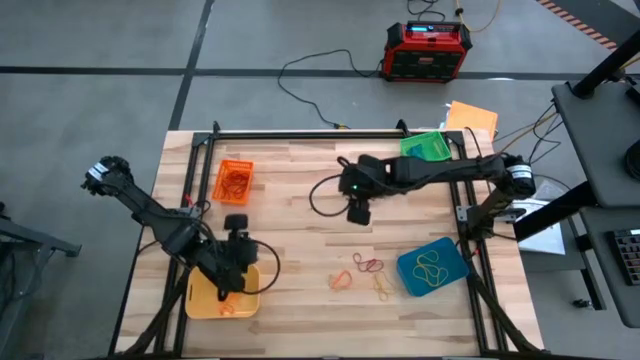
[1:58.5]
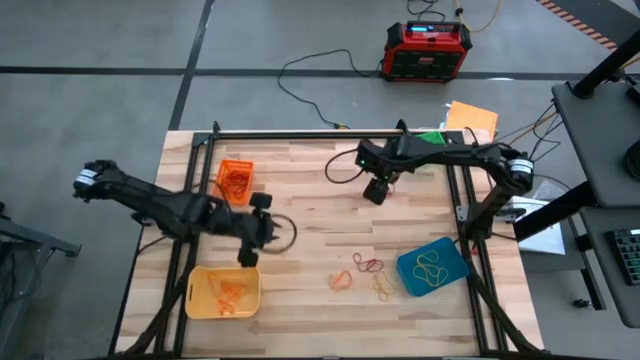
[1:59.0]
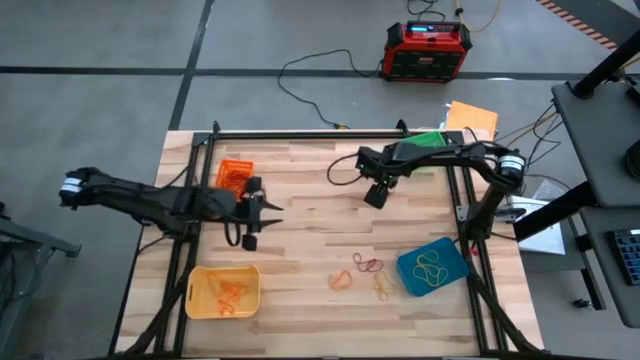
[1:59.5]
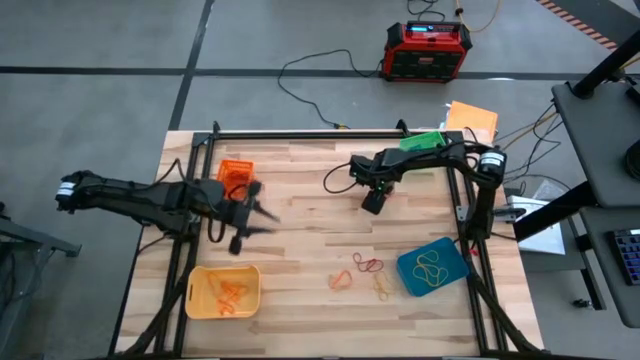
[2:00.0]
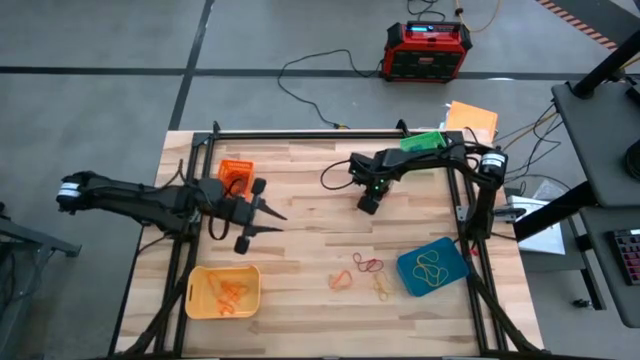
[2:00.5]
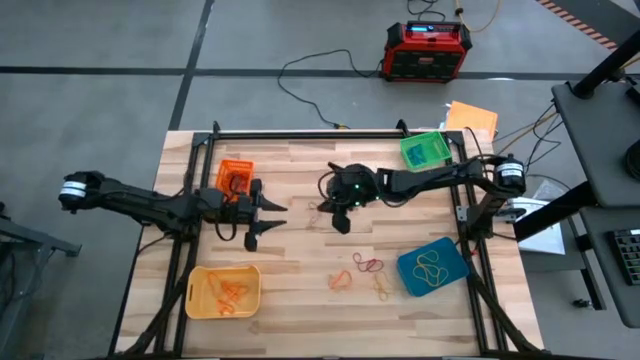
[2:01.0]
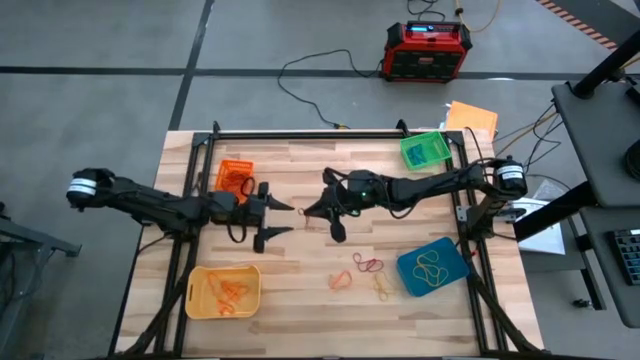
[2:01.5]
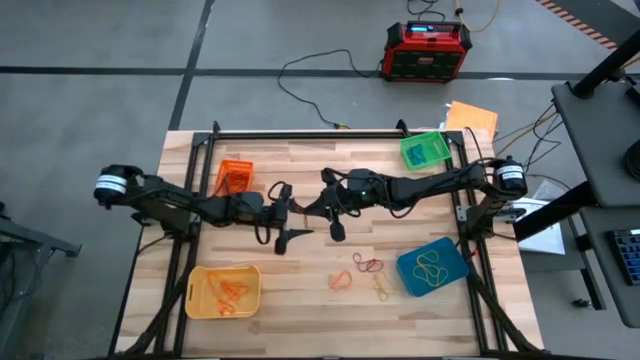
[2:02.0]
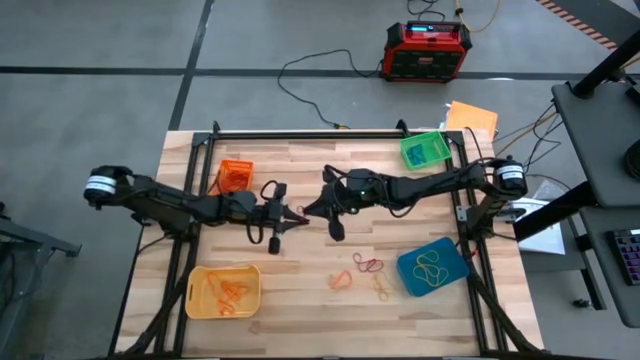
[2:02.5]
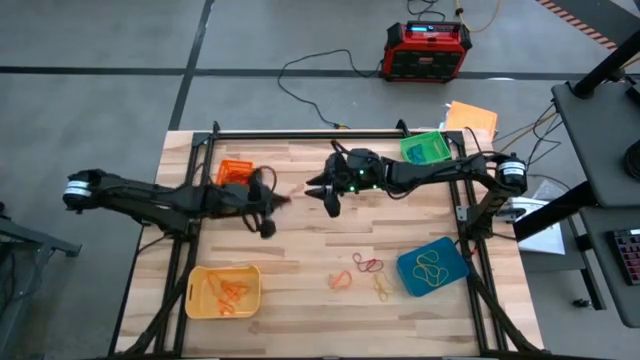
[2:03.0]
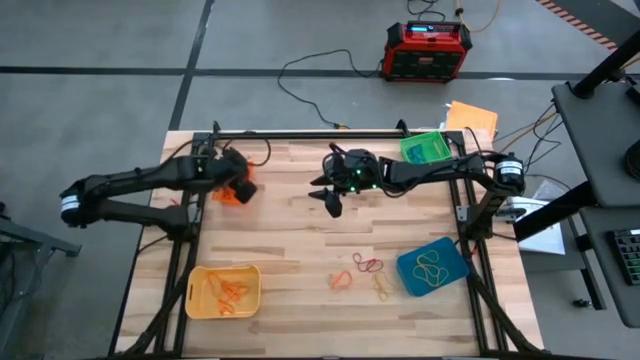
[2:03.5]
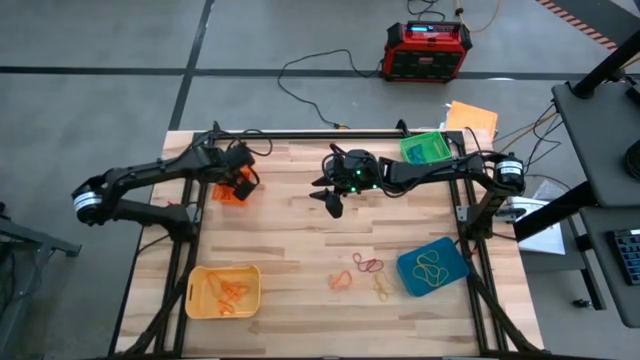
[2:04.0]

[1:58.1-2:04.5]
Task: Sort rubber bands into baskets
Put the red rubber band into the orange bin

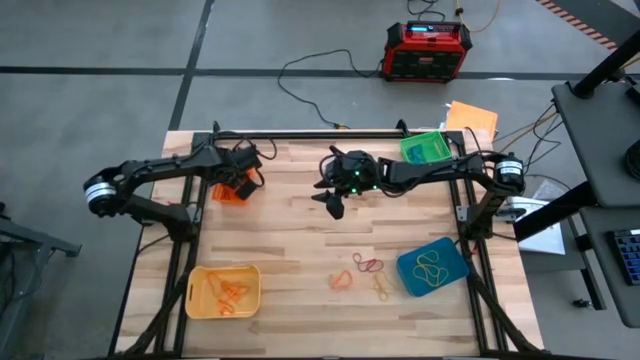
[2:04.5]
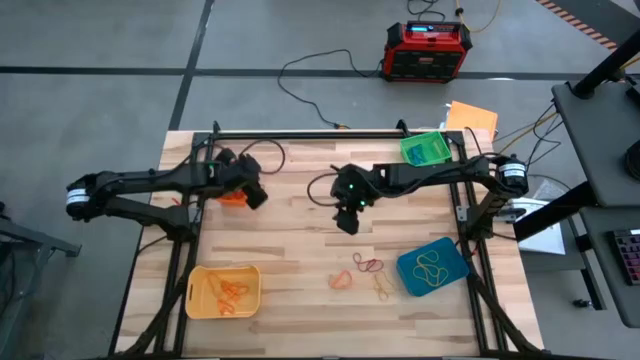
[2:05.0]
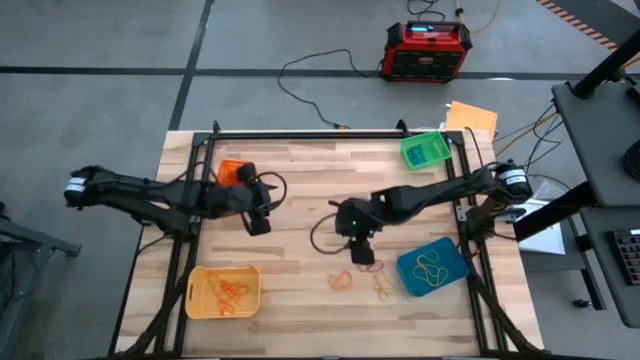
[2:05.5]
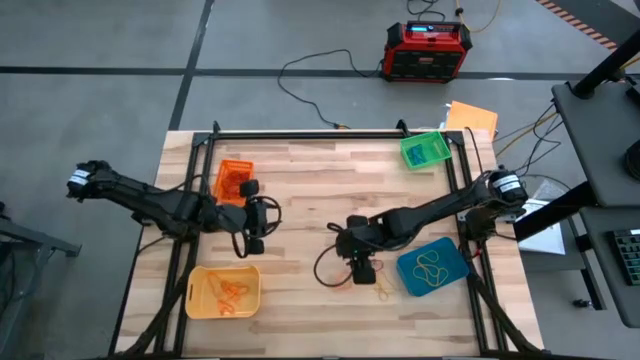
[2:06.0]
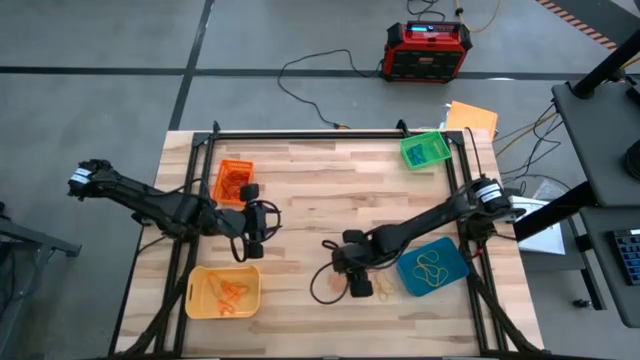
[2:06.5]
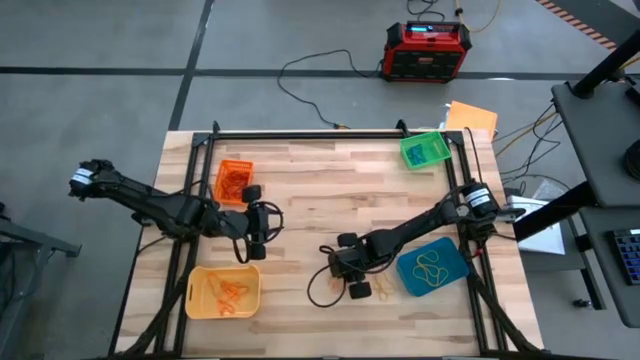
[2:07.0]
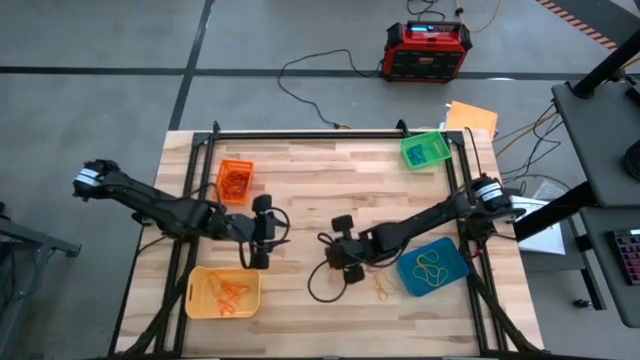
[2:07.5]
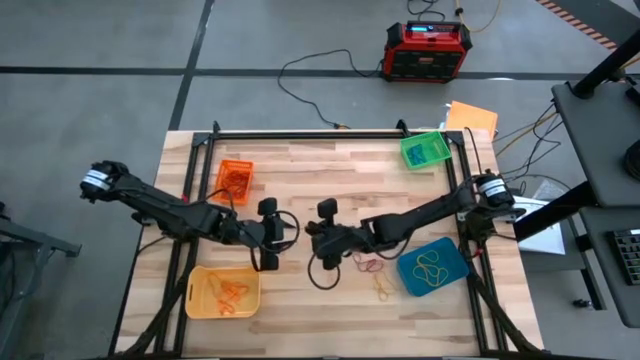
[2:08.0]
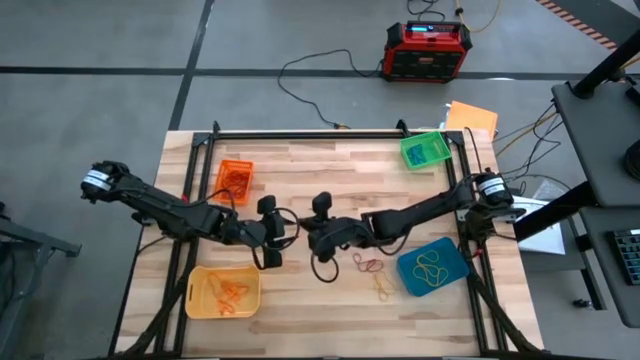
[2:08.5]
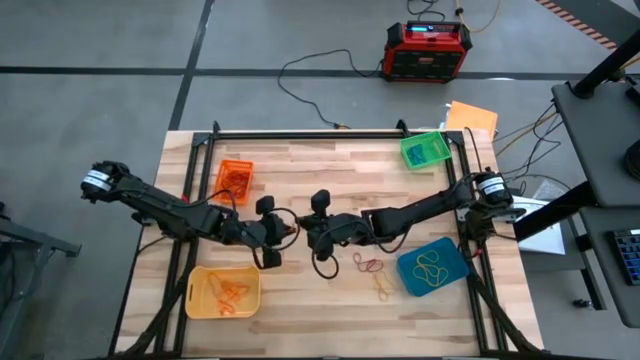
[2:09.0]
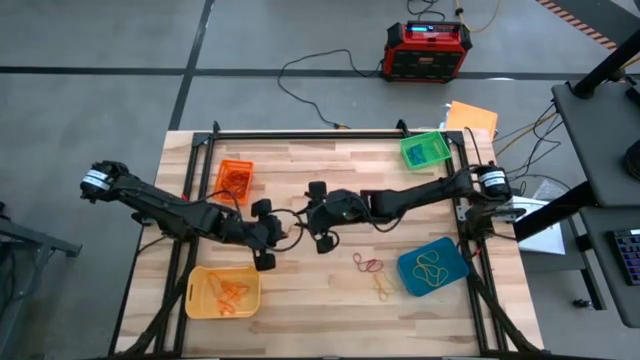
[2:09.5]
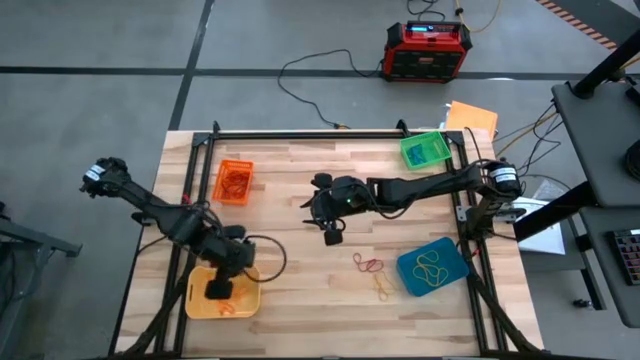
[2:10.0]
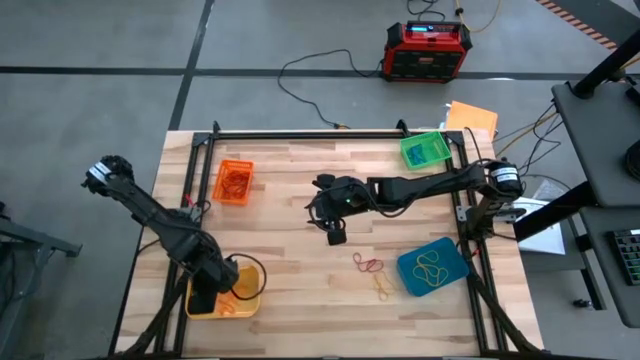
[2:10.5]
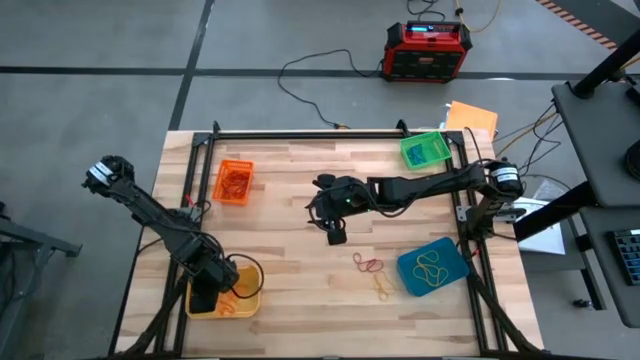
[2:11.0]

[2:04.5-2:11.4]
Put the orange rubber band into the yellow bin

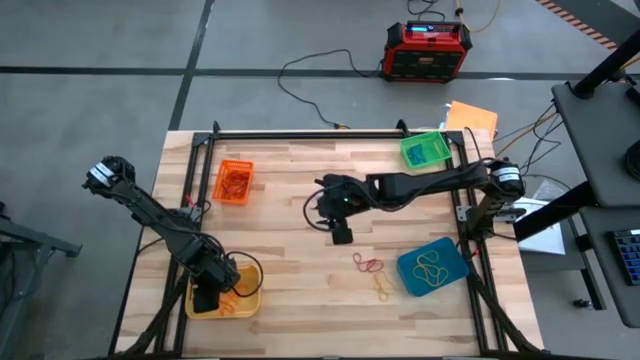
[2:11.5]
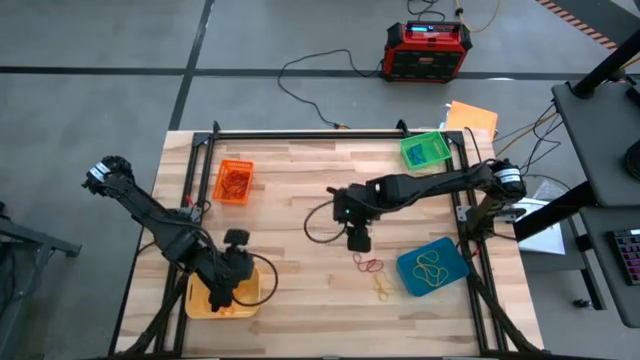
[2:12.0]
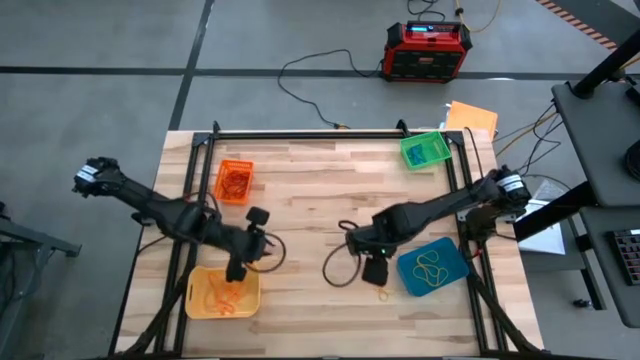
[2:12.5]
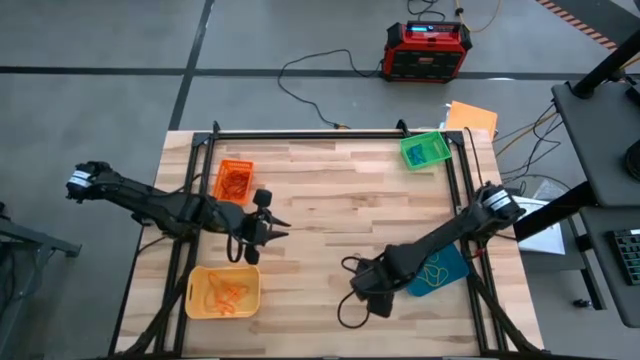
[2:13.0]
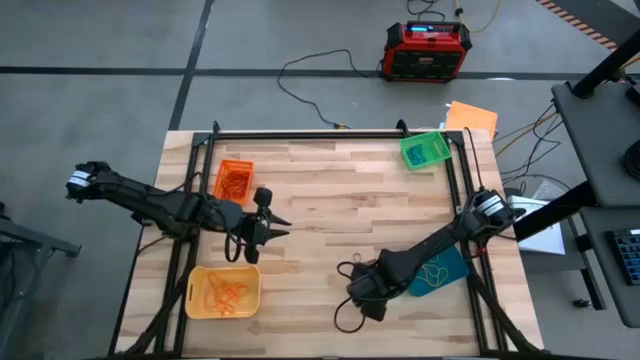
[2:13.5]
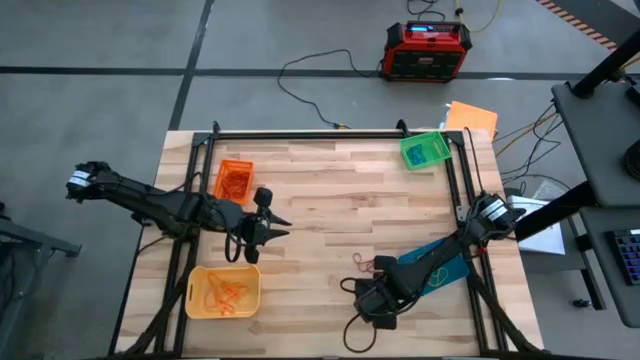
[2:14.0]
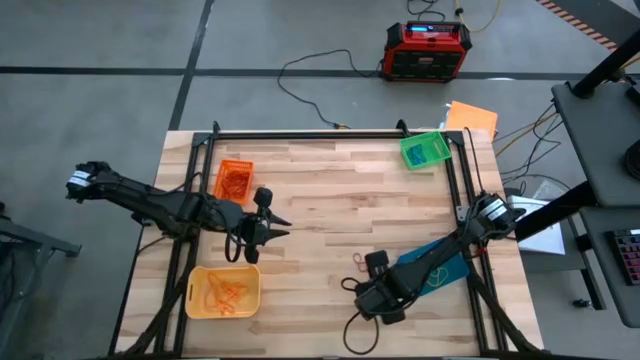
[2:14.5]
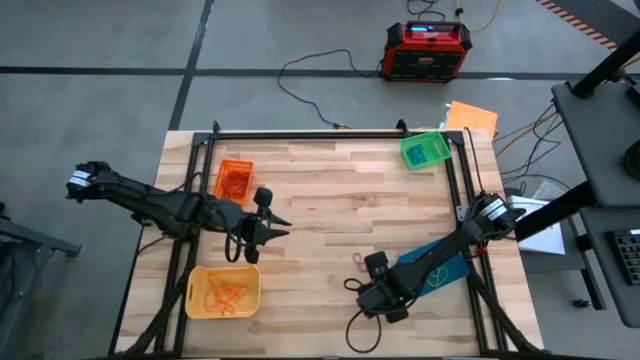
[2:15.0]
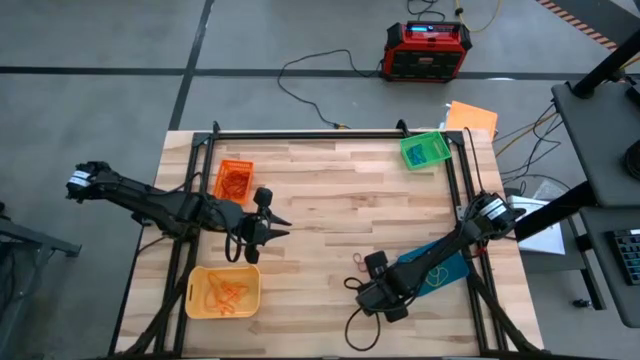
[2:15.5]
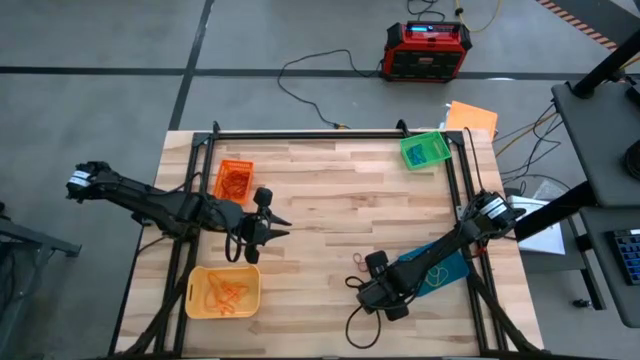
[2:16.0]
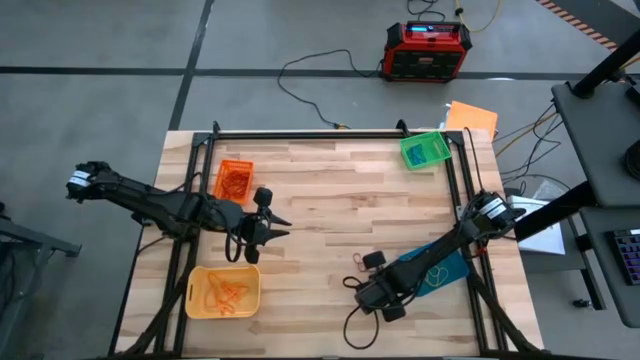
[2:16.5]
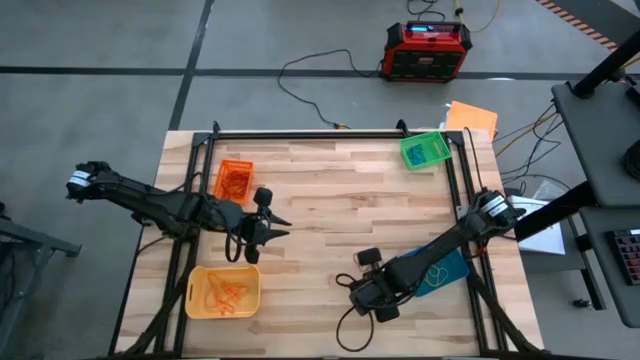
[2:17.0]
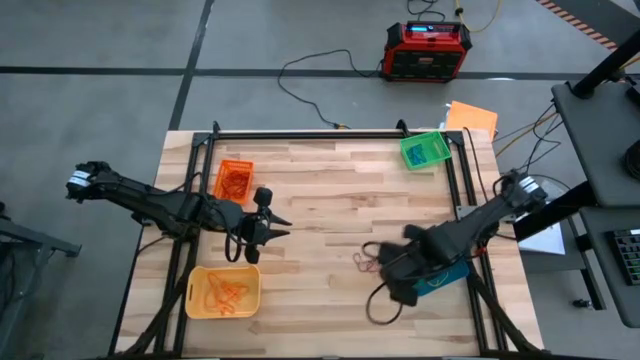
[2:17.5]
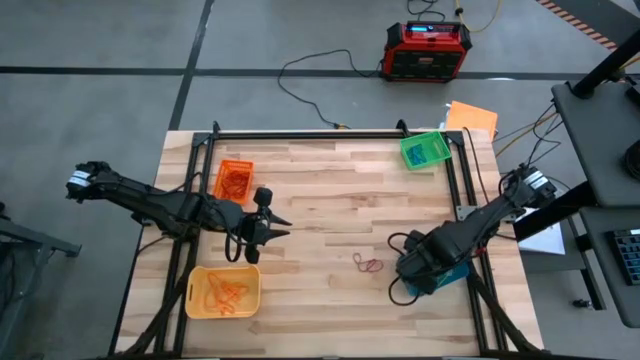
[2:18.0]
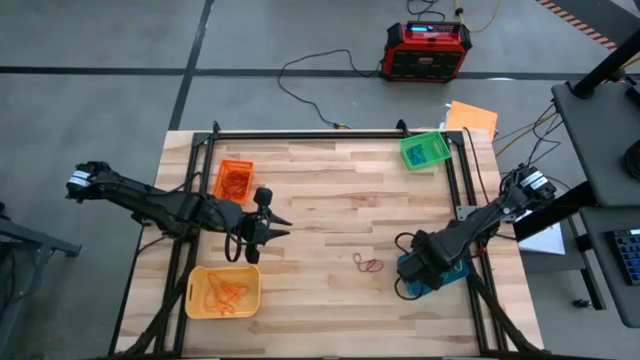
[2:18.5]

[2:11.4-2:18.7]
Put the yellow rubber band into the blue bin

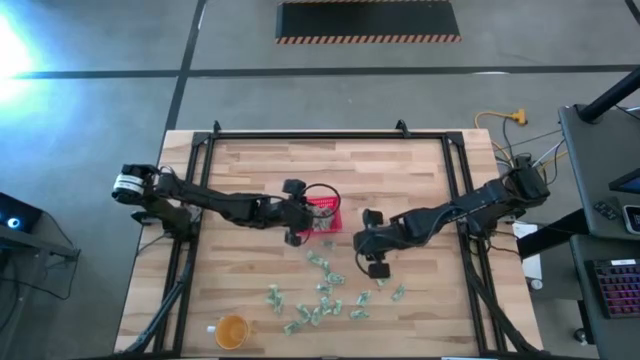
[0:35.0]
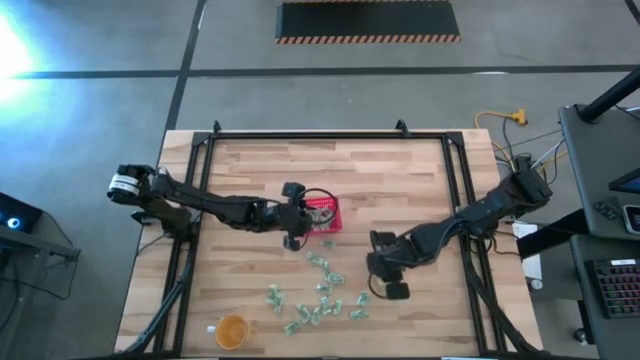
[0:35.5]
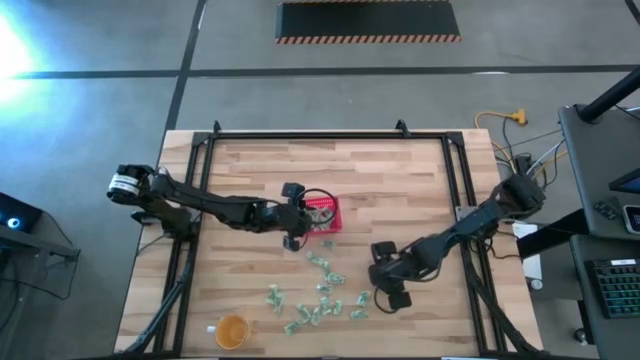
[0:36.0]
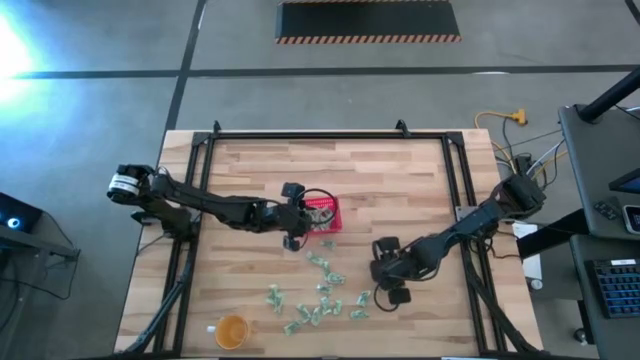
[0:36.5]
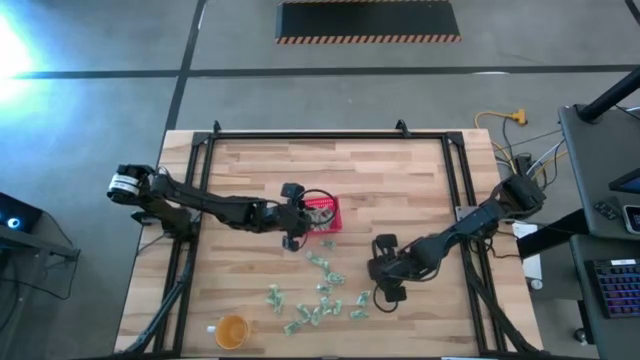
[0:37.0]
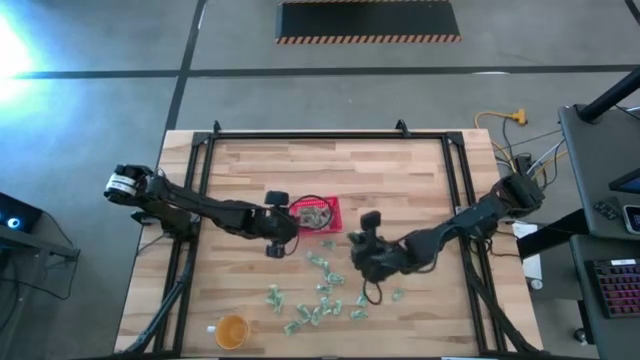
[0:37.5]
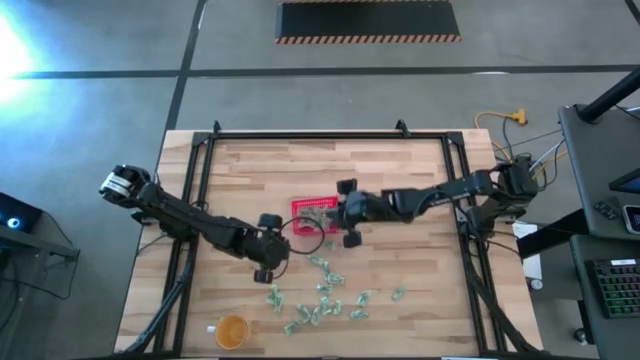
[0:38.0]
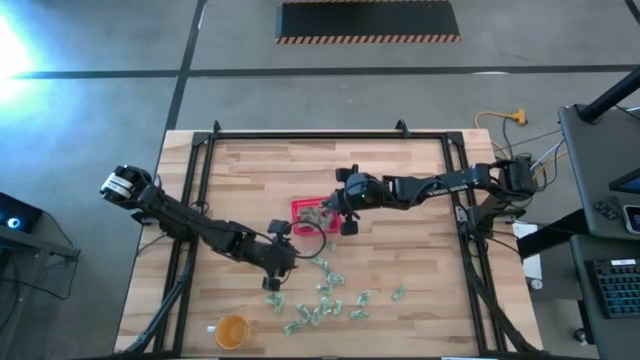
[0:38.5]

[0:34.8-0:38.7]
Task: Pick and place items into bin
Put the stevia packet into the red bin
